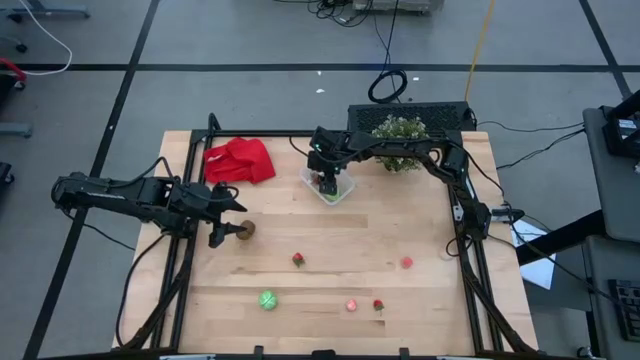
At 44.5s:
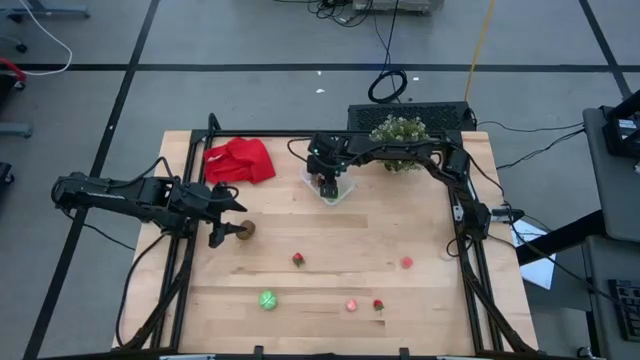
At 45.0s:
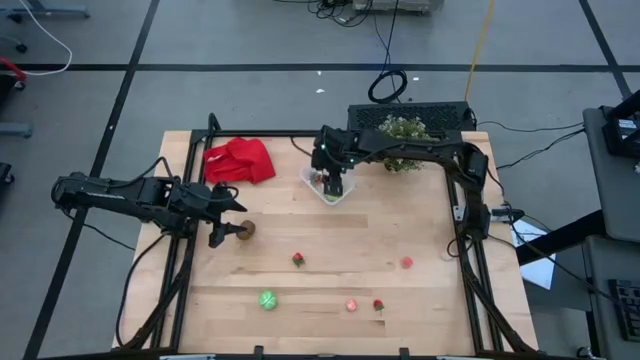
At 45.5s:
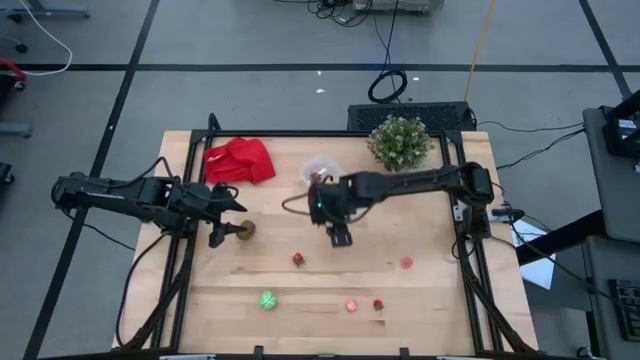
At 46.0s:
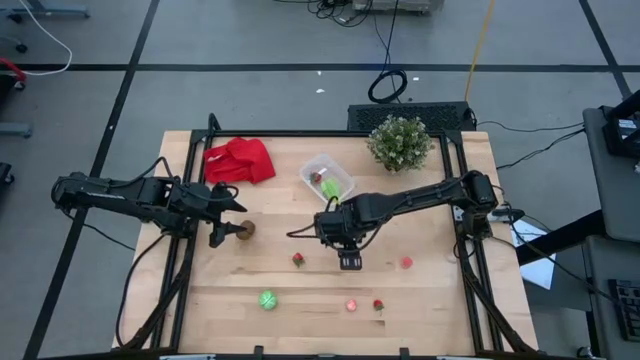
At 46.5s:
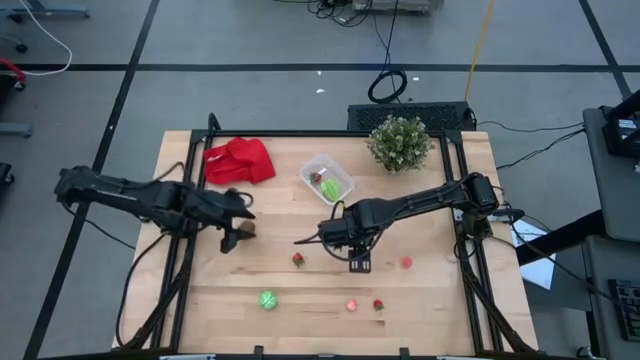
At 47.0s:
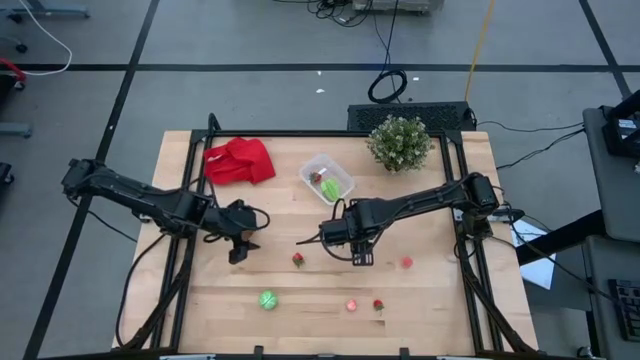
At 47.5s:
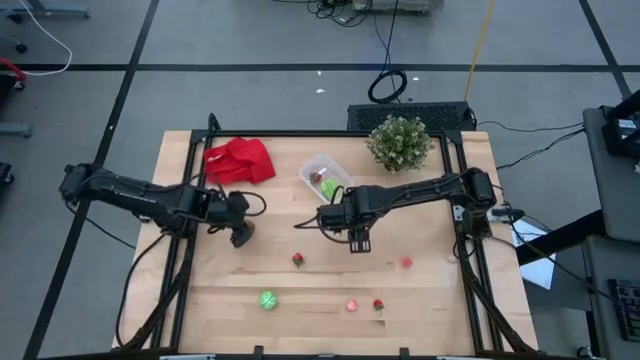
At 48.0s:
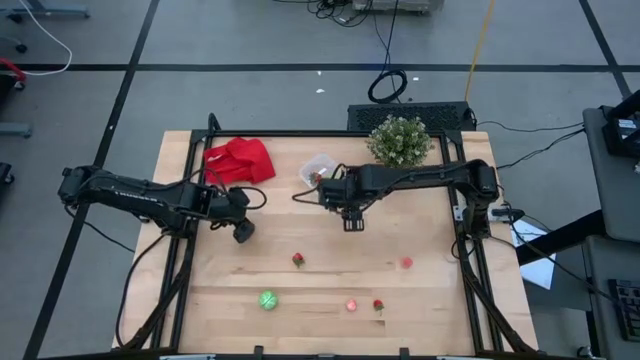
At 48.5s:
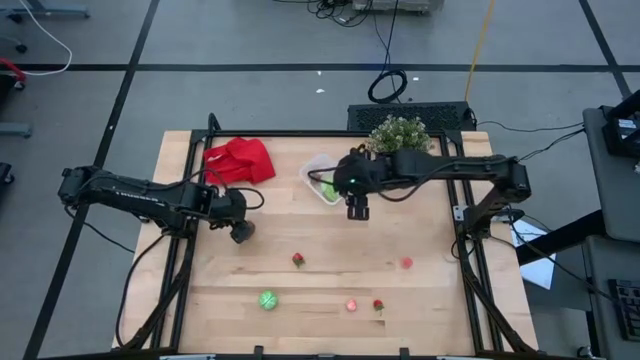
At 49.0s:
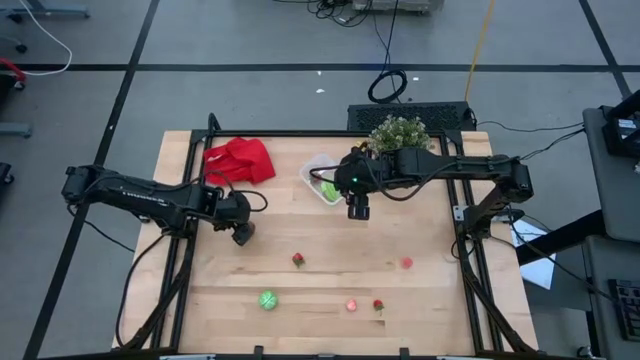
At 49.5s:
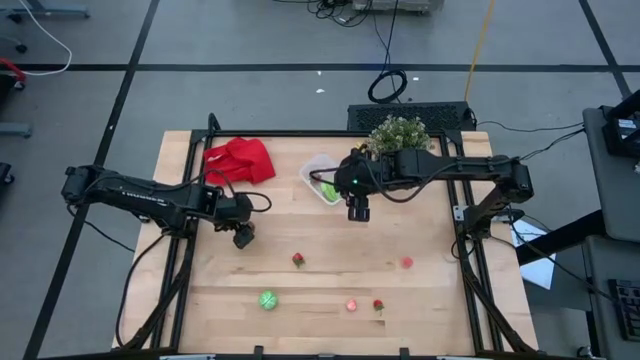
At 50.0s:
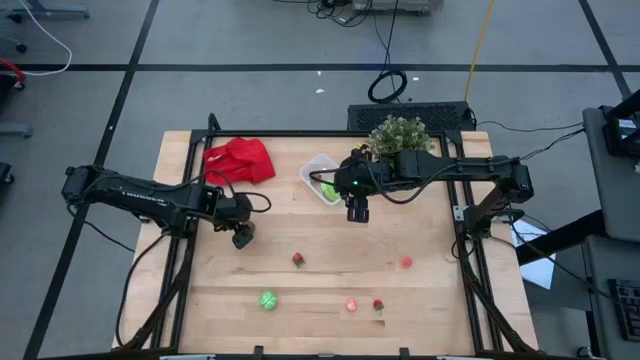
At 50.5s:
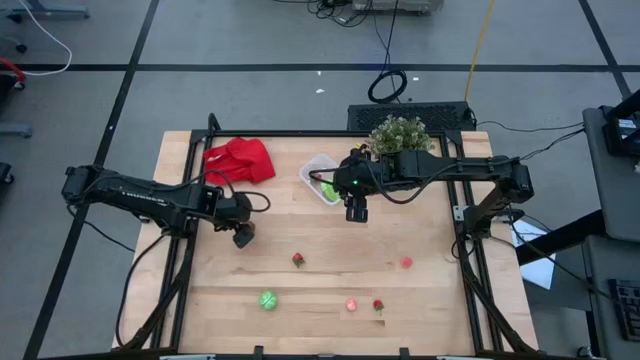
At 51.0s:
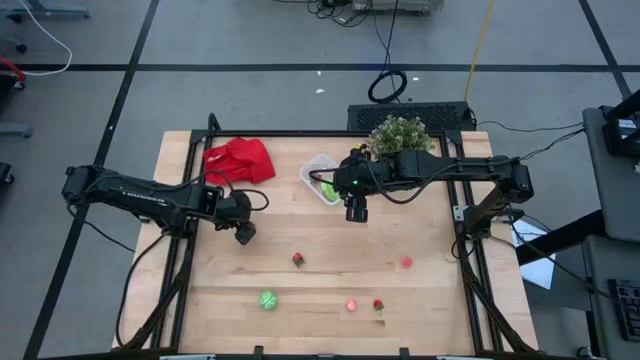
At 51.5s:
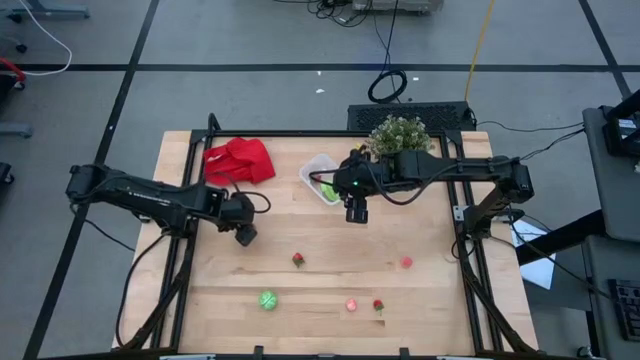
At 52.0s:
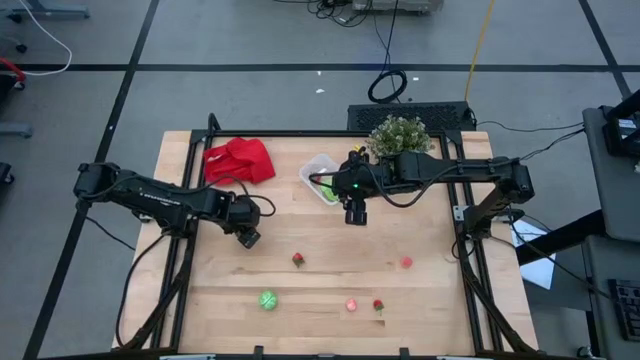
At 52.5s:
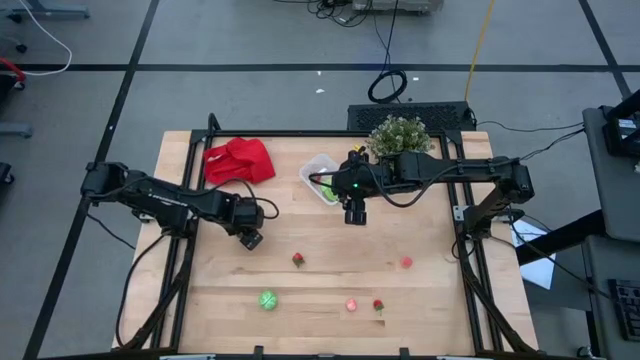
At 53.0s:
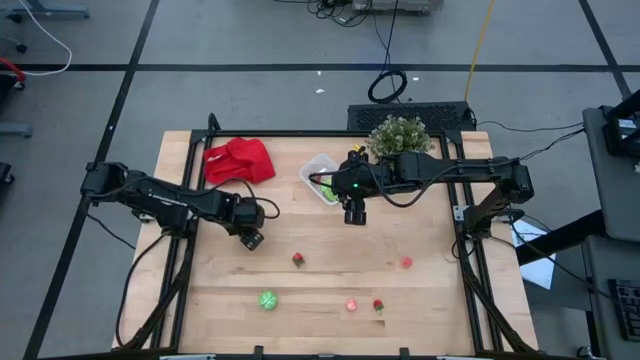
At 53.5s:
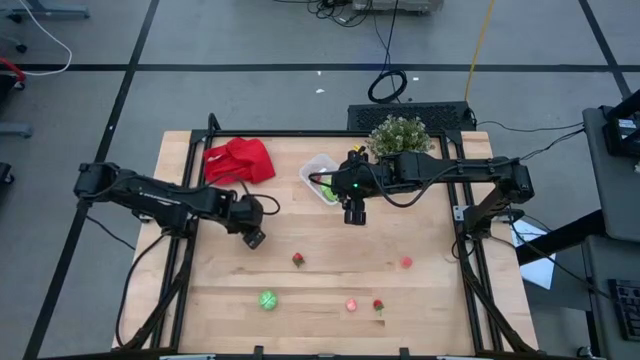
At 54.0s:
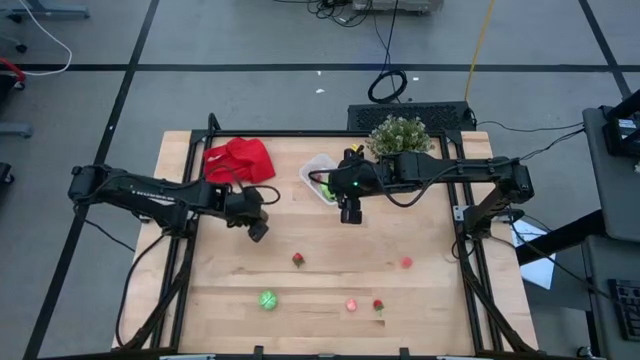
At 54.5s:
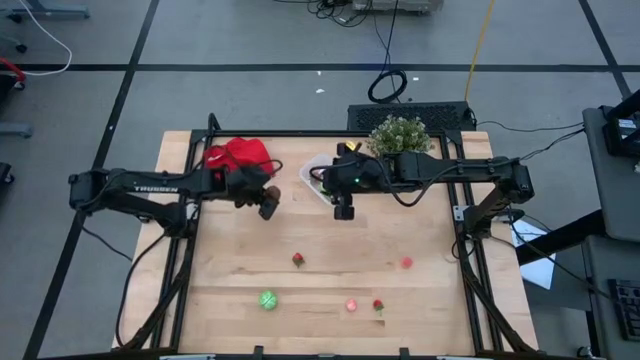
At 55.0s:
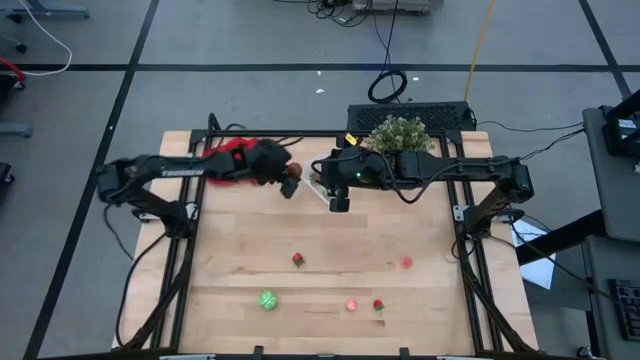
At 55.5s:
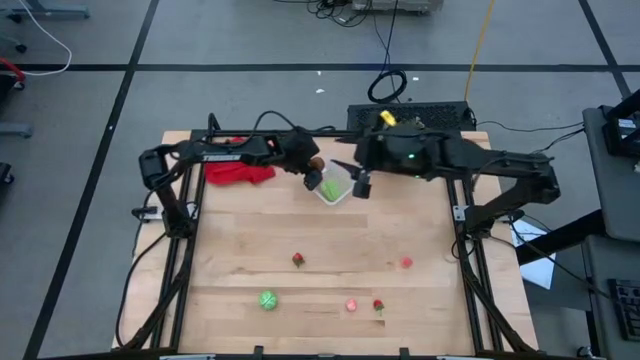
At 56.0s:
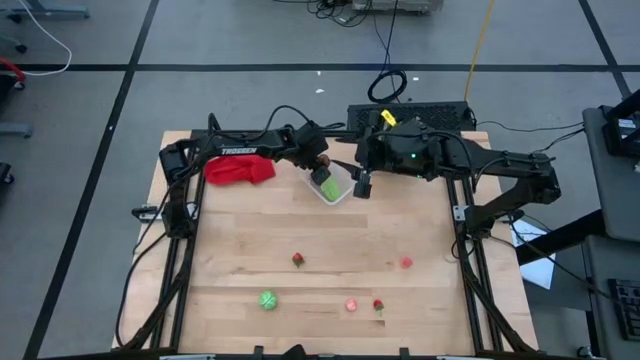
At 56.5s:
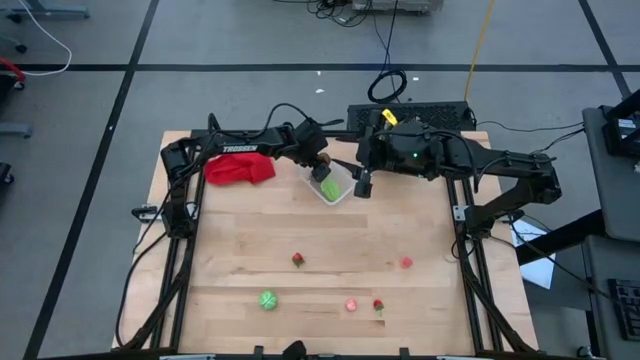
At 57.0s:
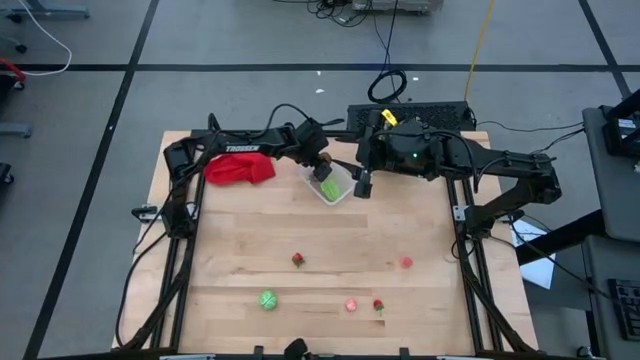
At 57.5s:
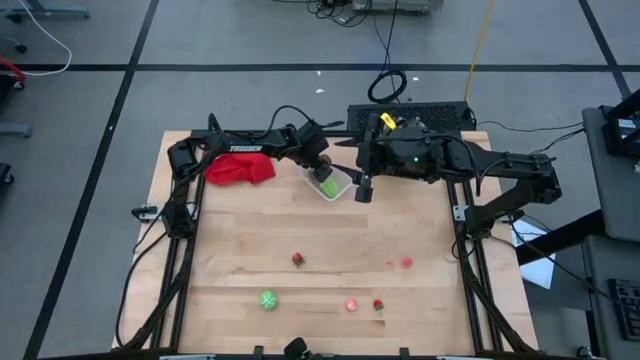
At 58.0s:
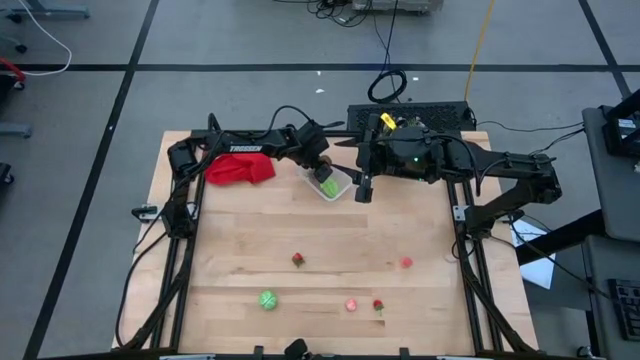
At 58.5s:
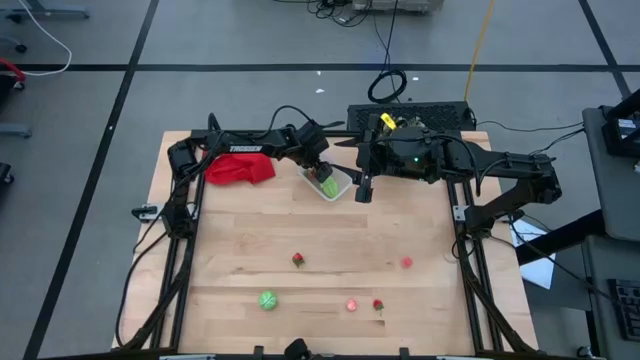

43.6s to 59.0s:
Task: Pick and placing Produce into tupperware
Put the brown kiwi into the transparent bin

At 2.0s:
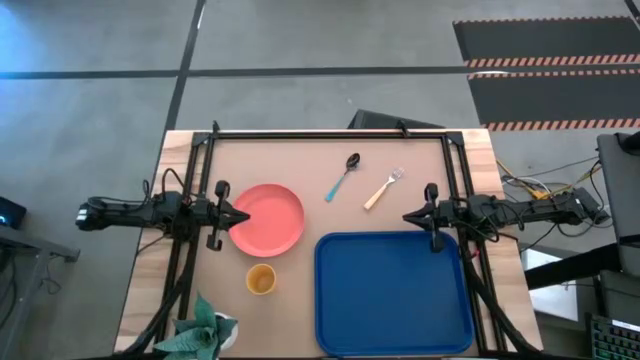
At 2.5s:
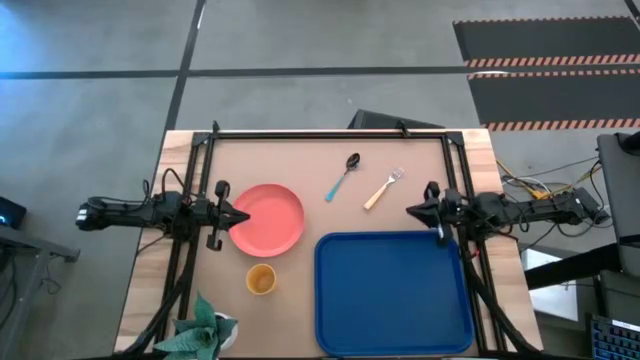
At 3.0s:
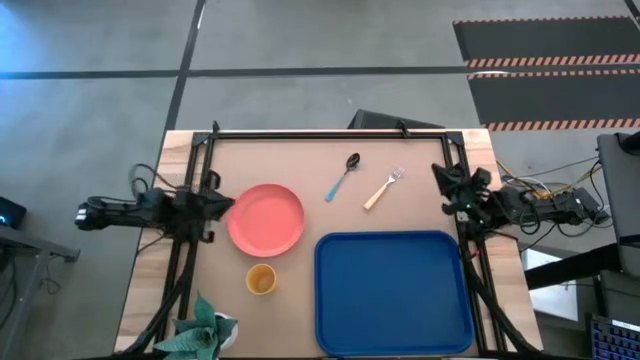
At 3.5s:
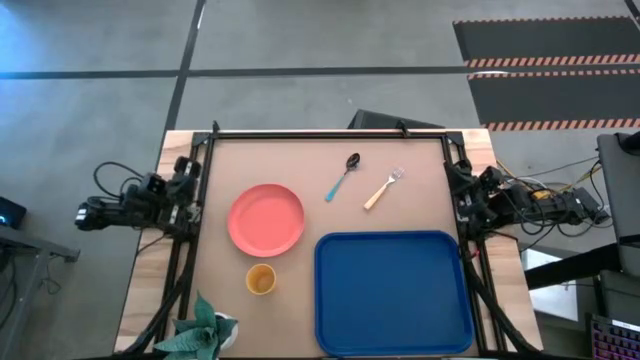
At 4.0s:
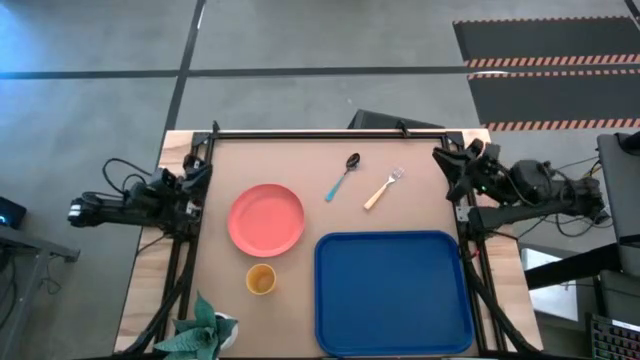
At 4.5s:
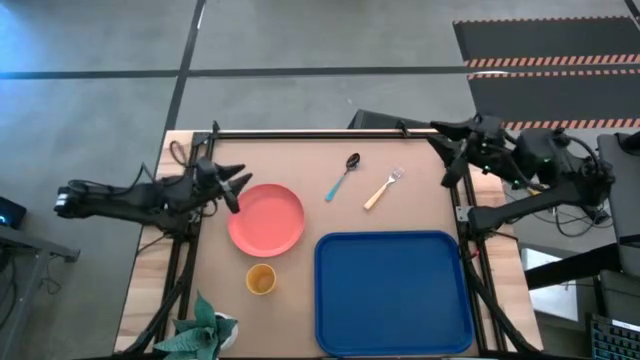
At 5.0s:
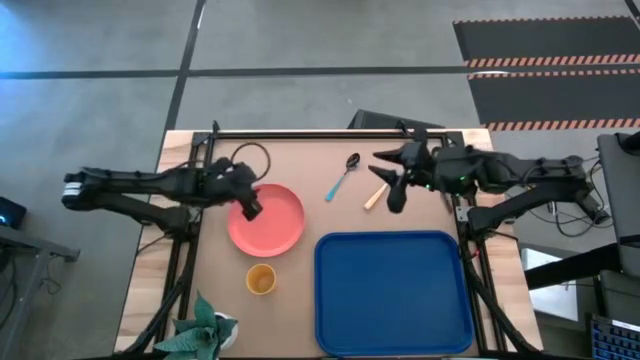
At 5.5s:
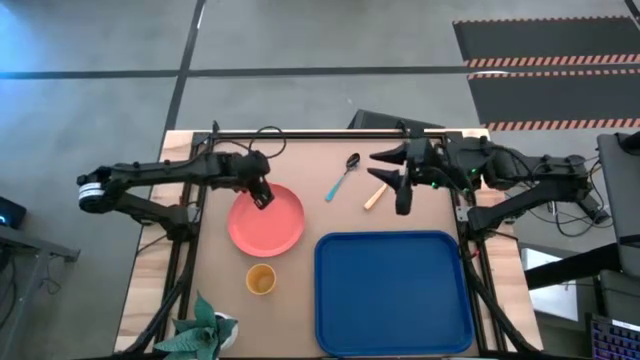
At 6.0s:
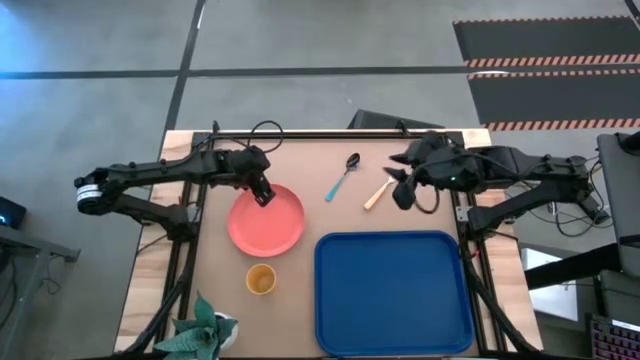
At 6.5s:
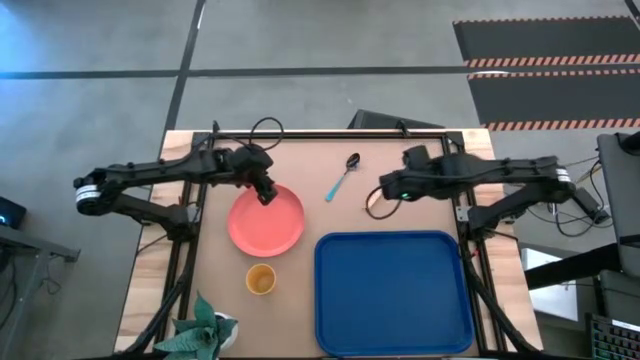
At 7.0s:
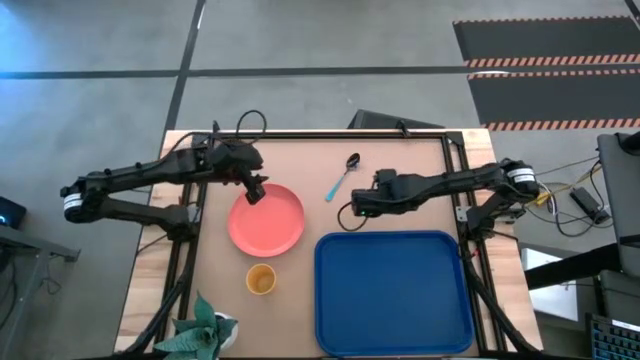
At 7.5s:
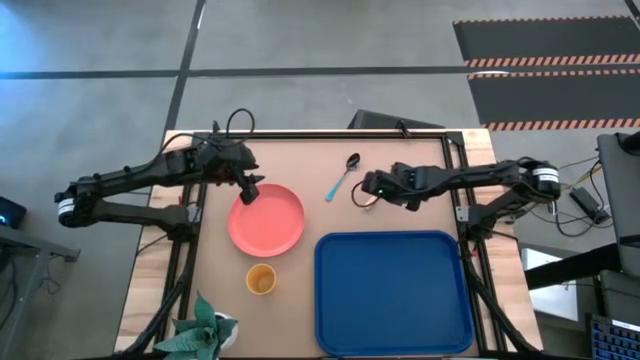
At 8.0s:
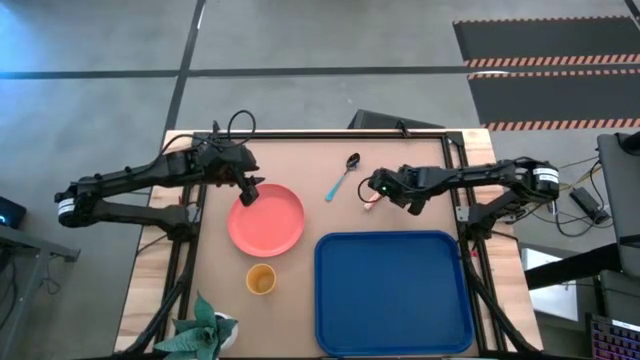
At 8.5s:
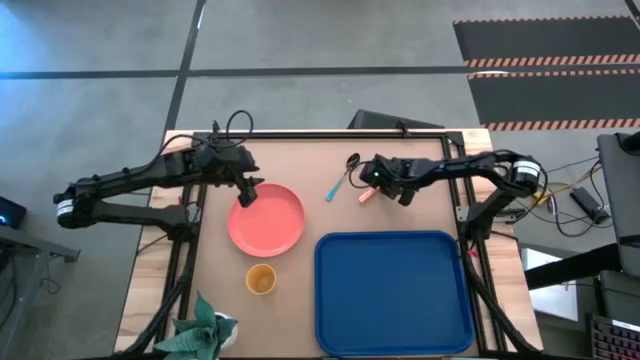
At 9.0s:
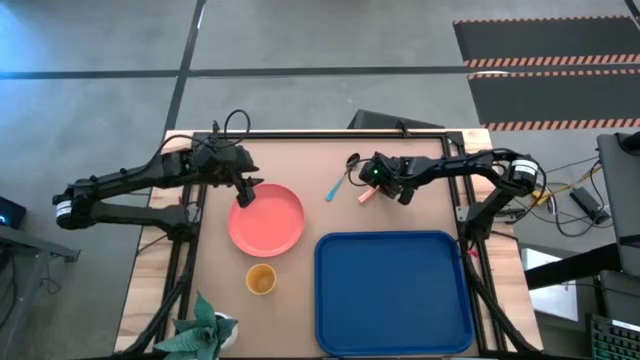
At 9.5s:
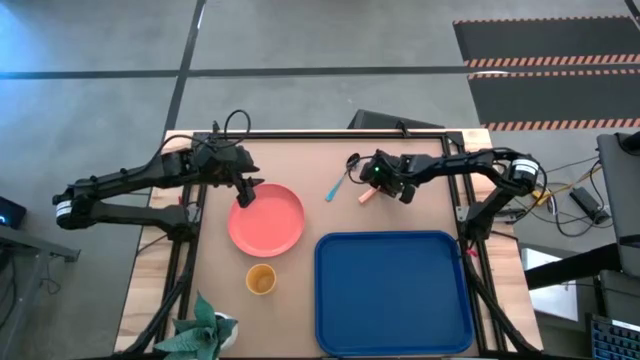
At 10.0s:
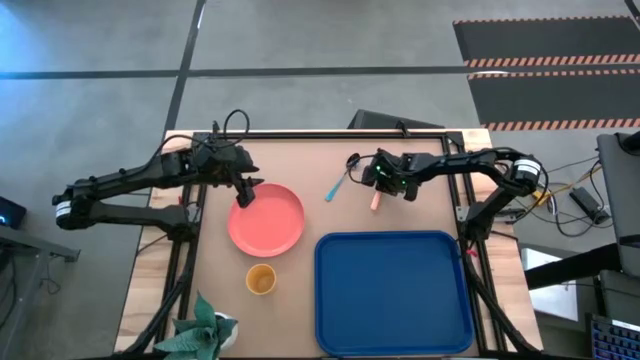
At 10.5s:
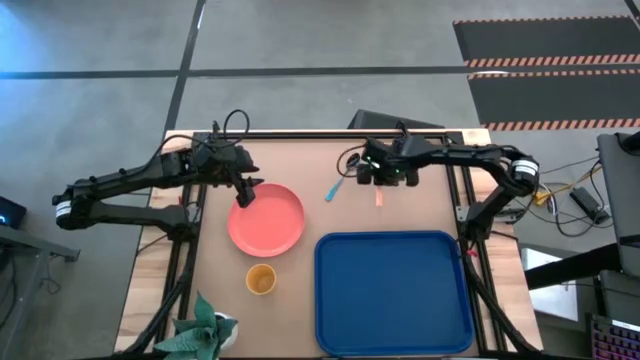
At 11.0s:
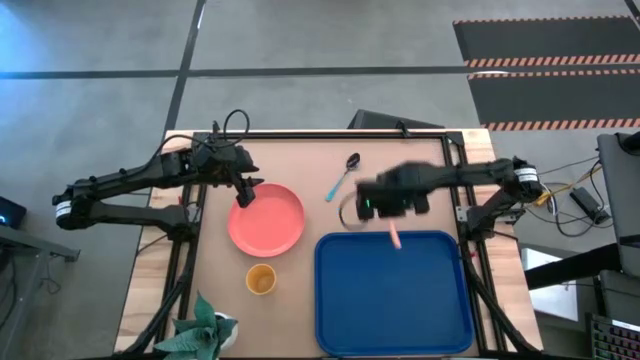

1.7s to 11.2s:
Task: Pick and place plate/cup/fork/spoon on tray
Put the light orange fork to the right on the blue tray
